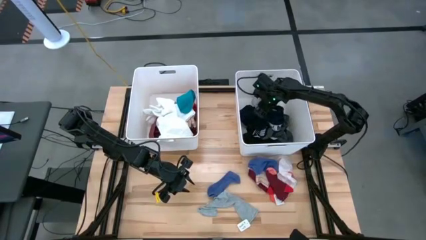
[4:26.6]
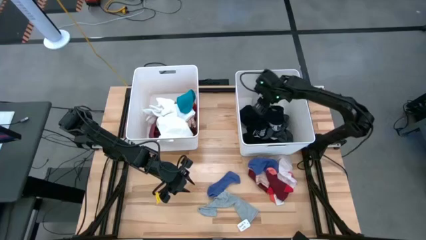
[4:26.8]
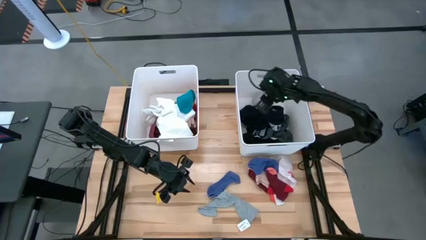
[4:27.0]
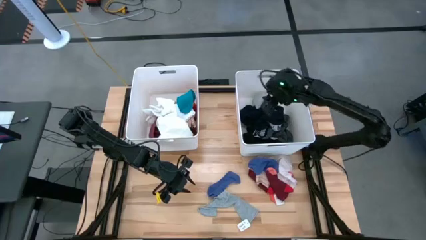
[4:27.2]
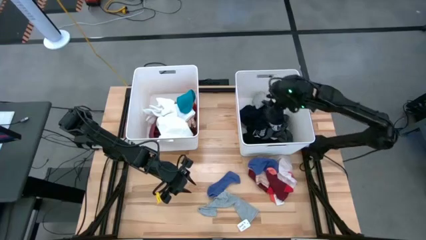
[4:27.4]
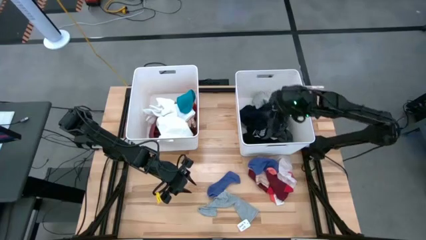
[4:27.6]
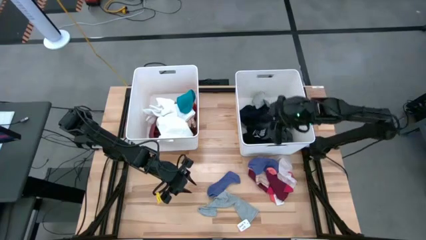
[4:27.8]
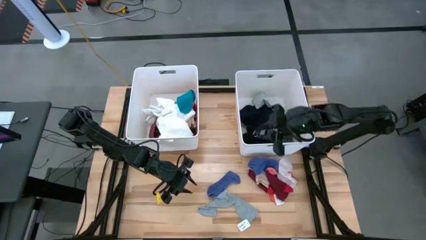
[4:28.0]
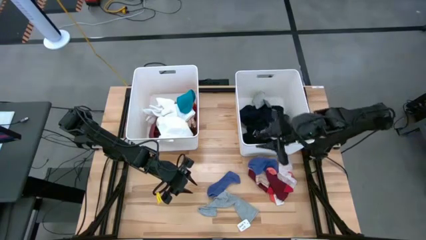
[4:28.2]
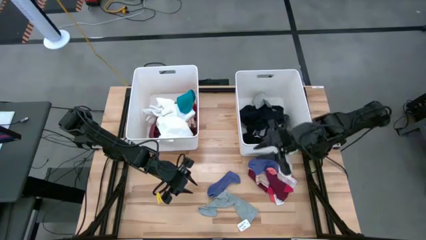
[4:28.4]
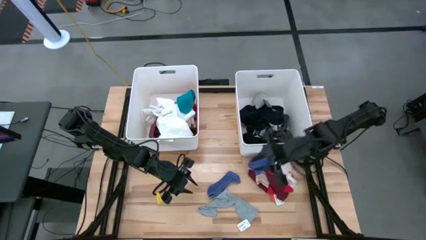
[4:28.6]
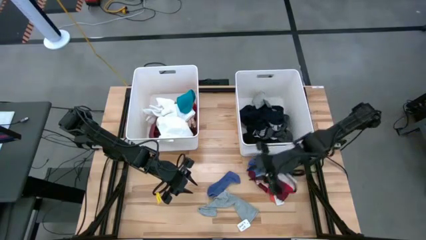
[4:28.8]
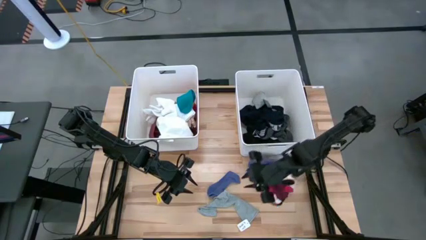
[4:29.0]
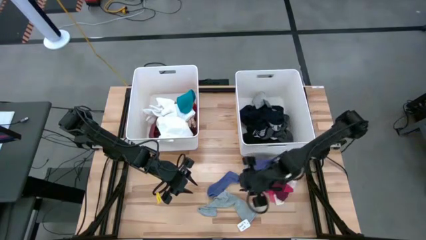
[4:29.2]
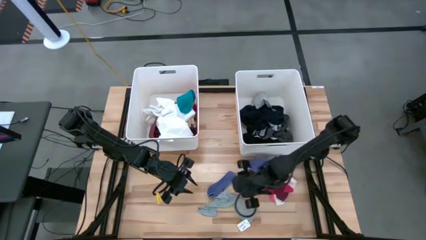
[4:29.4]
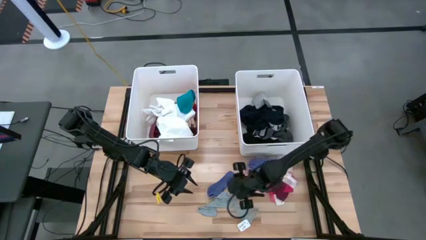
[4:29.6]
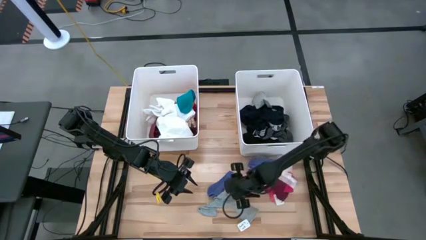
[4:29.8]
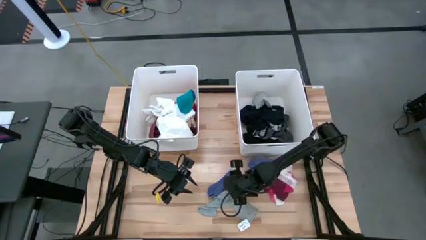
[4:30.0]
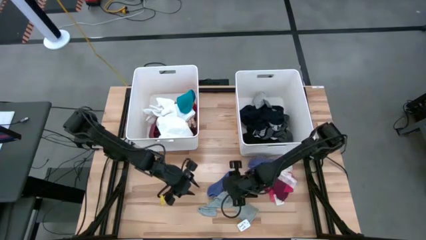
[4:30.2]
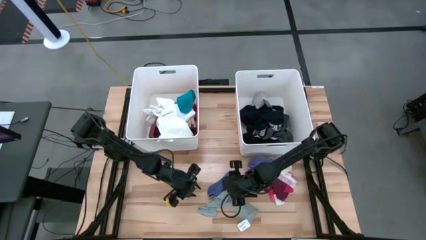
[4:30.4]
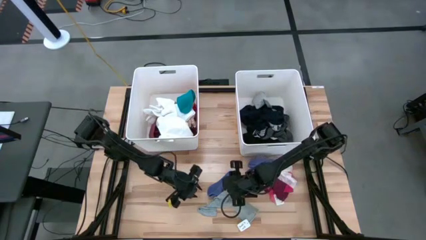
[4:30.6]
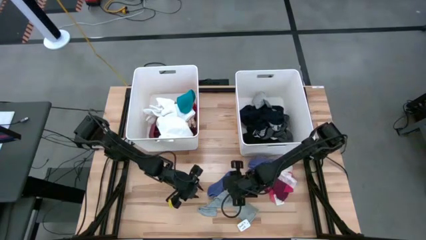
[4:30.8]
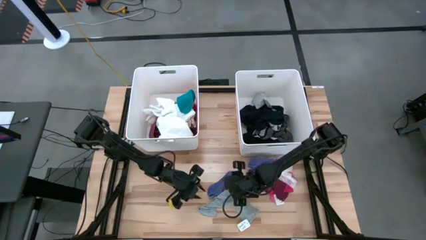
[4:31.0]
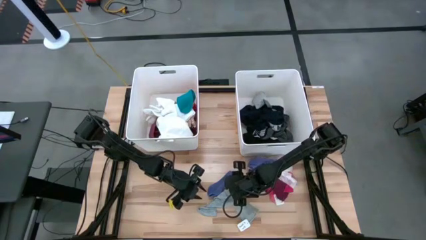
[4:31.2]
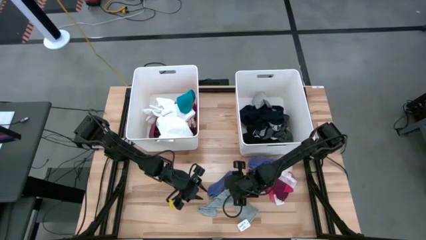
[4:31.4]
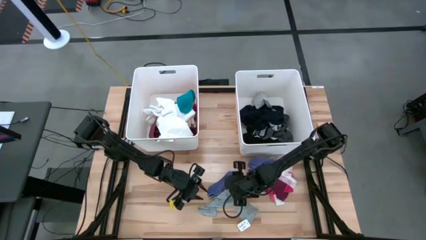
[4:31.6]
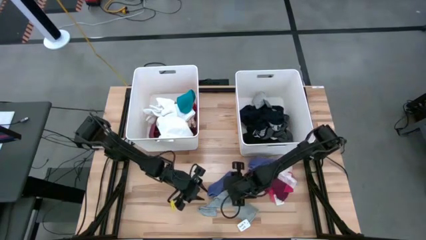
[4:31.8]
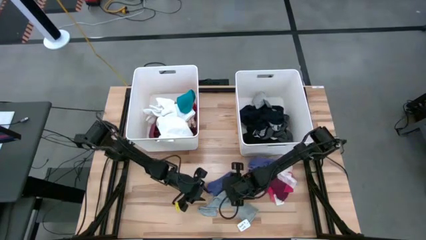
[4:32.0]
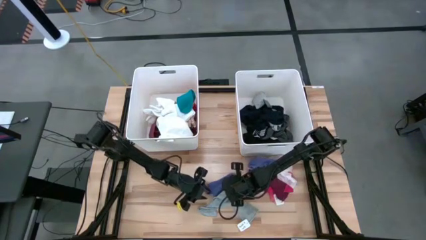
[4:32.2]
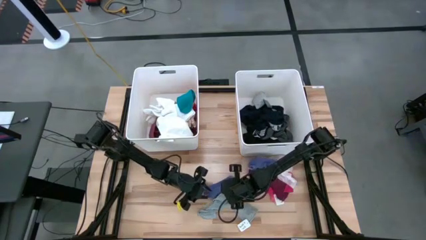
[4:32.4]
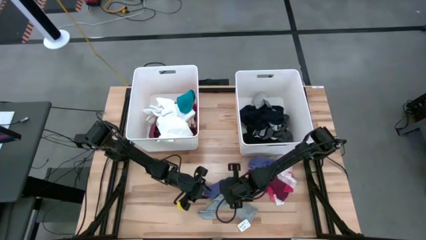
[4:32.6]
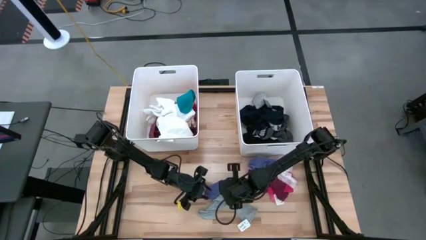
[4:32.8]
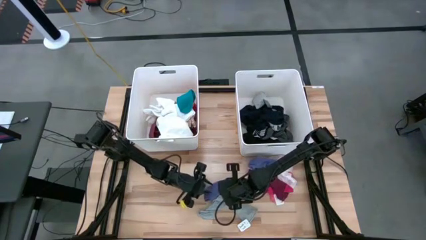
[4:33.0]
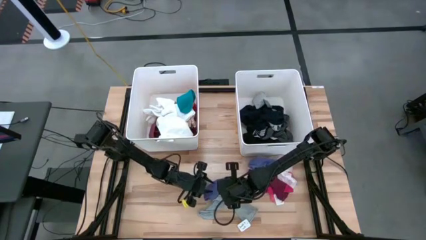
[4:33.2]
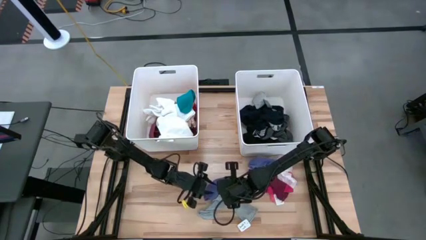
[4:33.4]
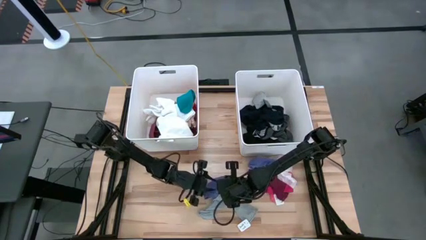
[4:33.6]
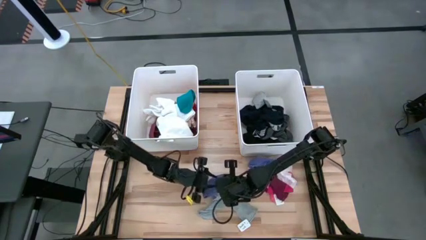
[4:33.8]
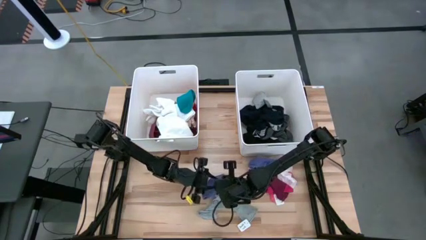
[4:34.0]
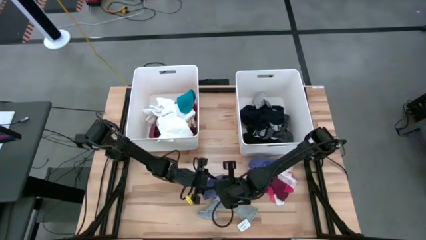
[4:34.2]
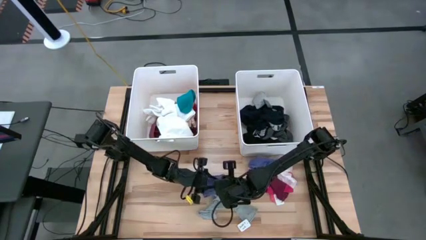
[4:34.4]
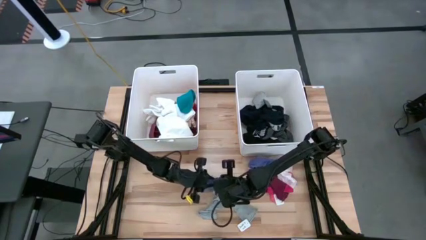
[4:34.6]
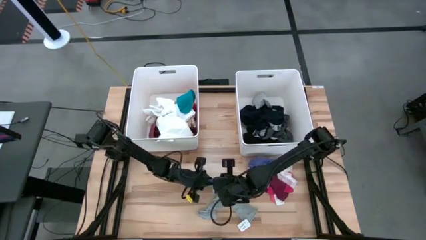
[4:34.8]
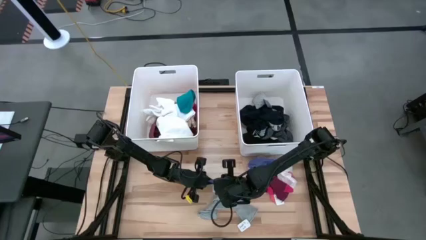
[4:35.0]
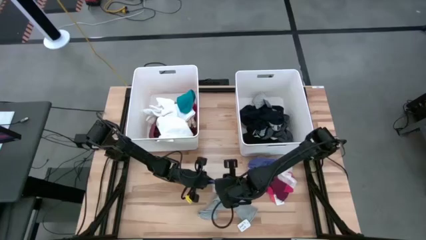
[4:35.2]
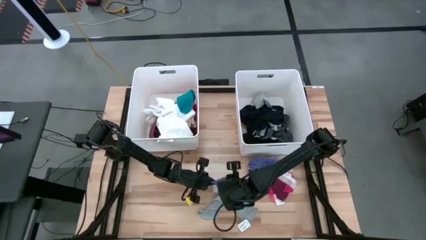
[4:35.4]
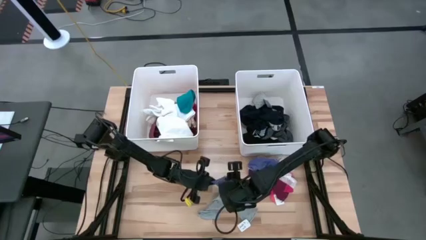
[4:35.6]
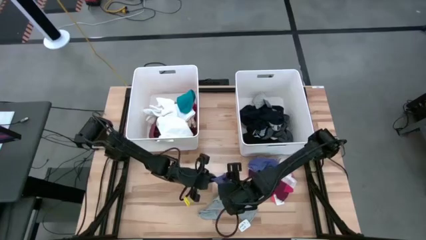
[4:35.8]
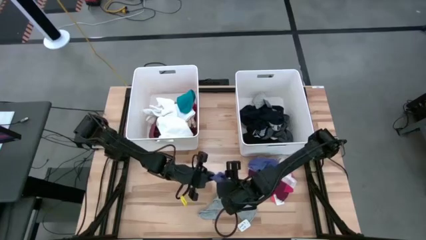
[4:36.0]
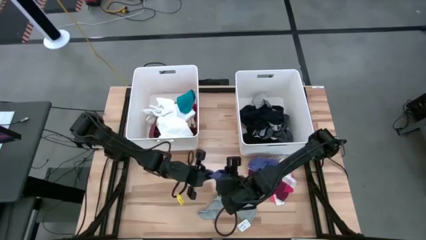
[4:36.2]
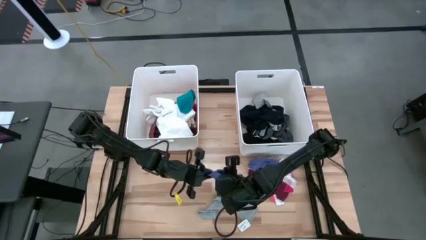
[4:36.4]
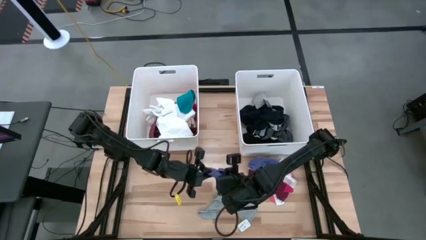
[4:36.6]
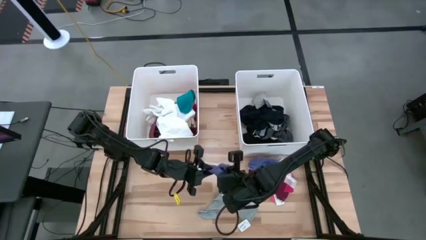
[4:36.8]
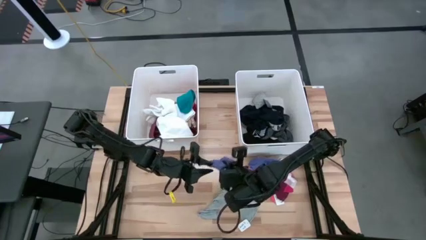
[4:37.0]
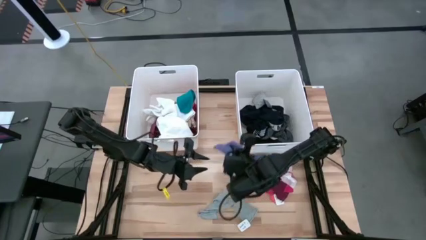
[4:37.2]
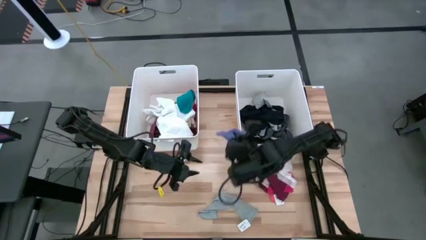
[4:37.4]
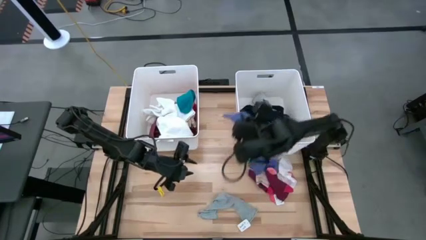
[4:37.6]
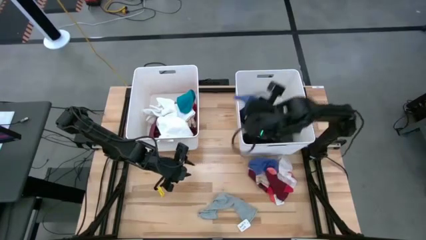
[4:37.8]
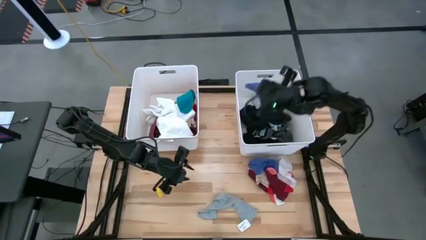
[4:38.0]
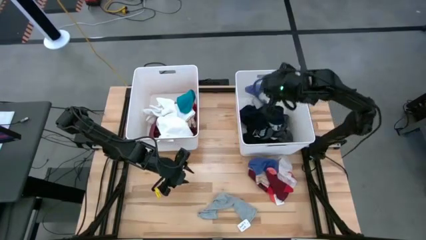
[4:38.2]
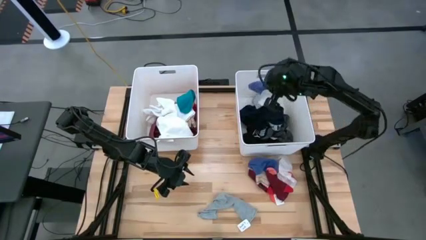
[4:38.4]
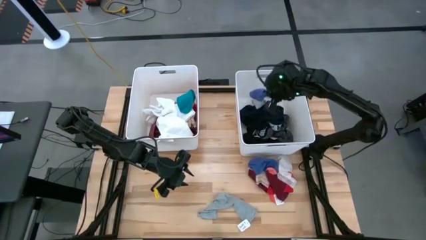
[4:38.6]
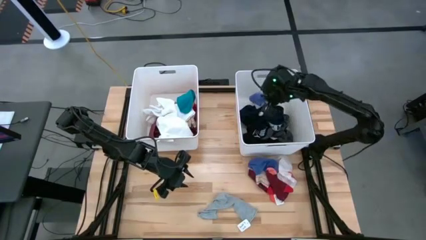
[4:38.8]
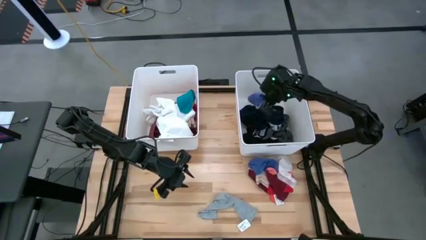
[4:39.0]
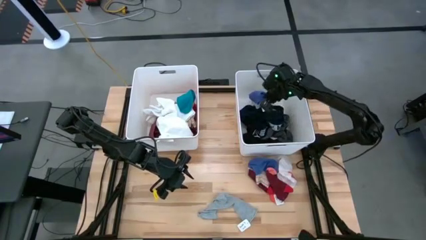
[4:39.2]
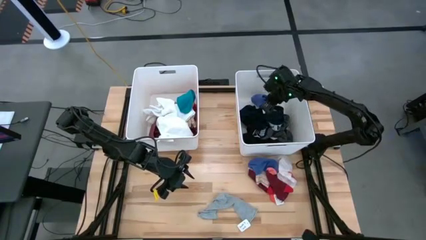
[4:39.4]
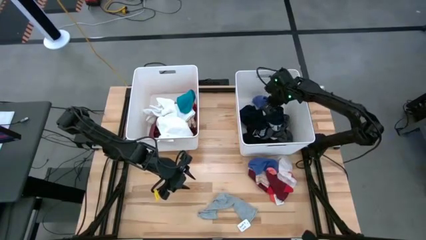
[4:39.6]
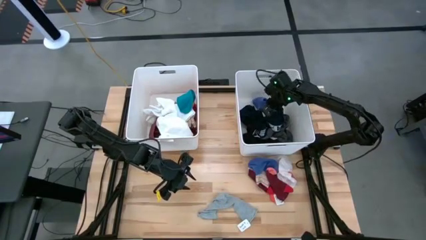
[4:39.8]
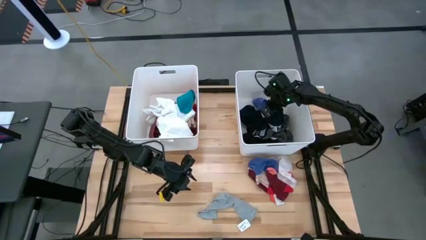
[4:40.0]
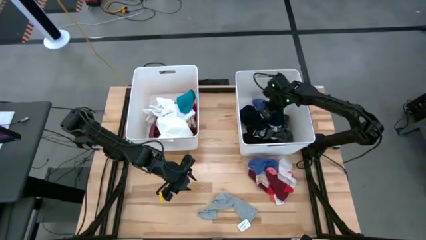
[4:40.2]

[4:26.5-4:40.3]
Task: Sort clothes
Put the blue sock into the right white bin
